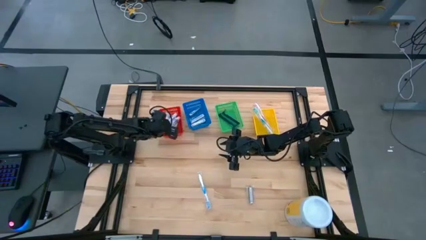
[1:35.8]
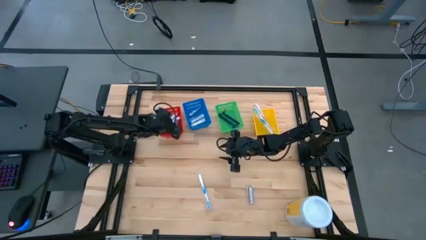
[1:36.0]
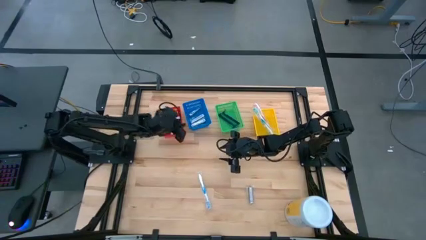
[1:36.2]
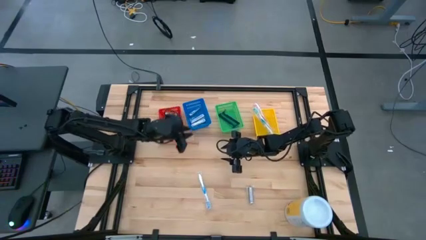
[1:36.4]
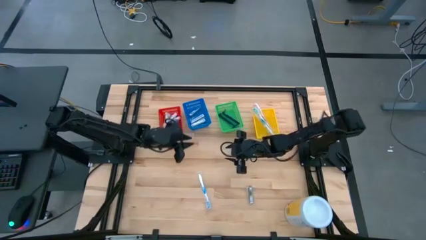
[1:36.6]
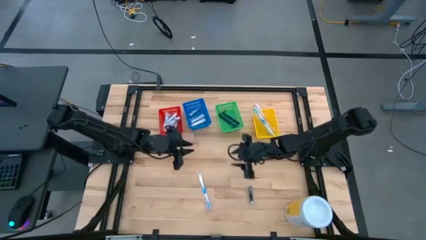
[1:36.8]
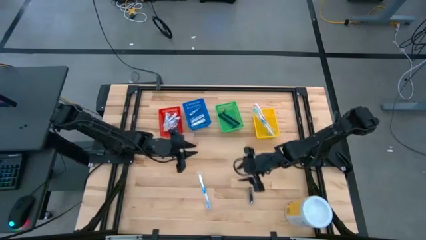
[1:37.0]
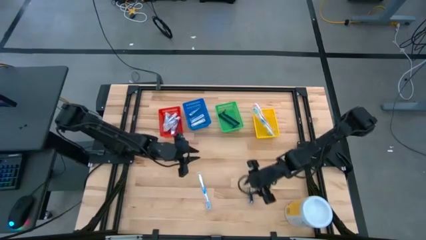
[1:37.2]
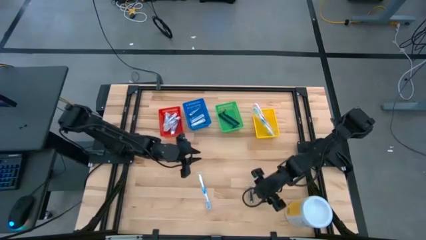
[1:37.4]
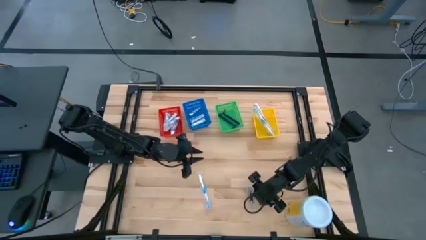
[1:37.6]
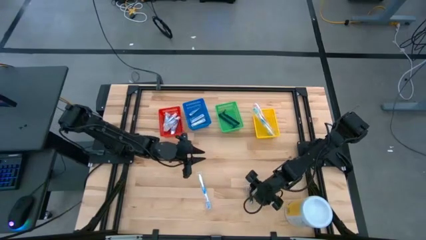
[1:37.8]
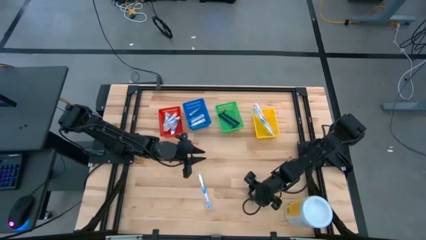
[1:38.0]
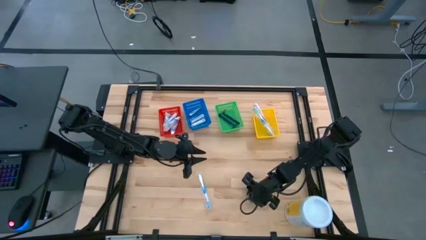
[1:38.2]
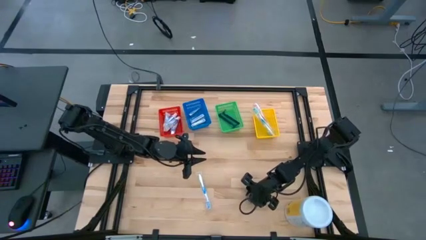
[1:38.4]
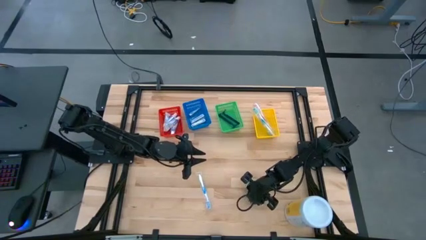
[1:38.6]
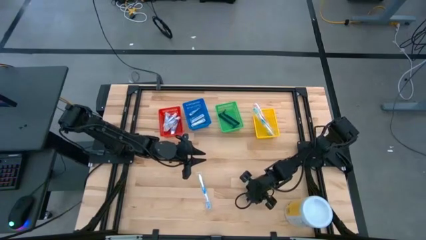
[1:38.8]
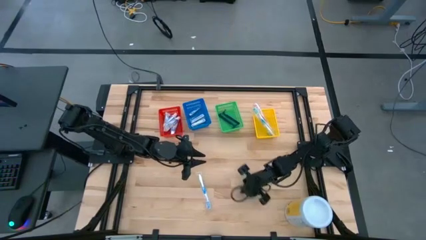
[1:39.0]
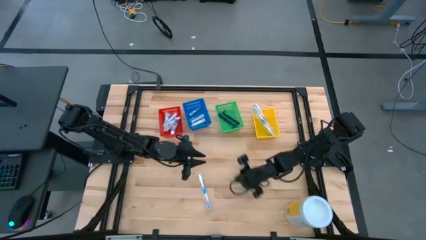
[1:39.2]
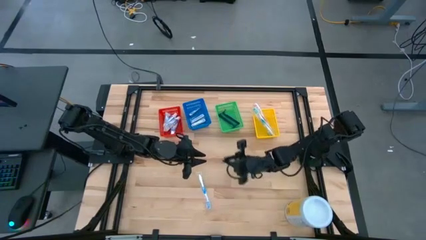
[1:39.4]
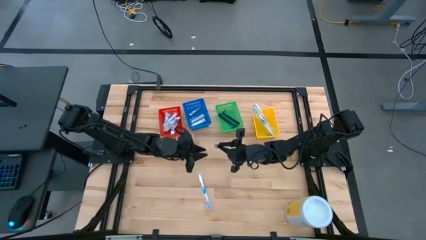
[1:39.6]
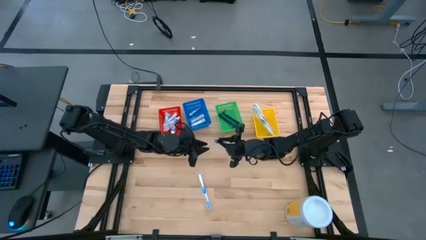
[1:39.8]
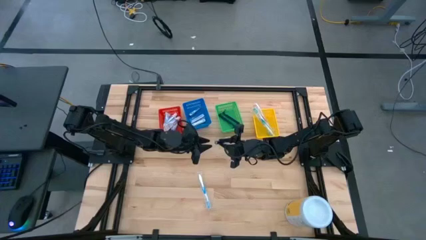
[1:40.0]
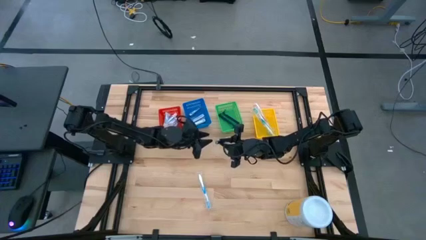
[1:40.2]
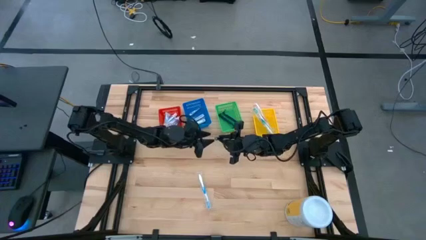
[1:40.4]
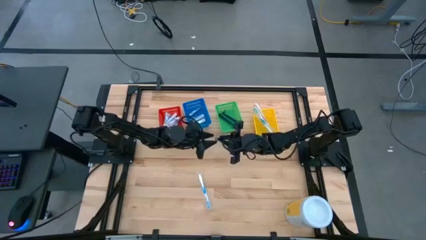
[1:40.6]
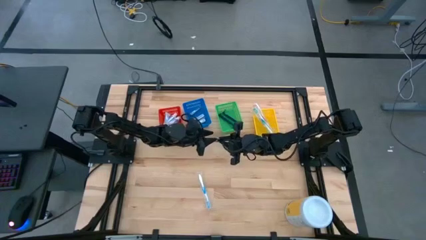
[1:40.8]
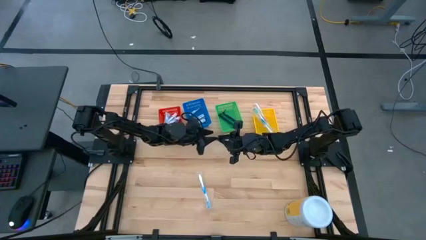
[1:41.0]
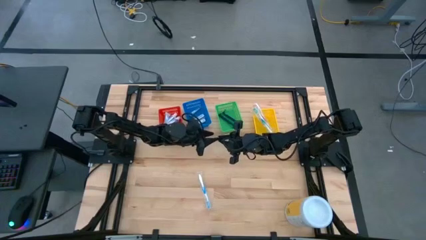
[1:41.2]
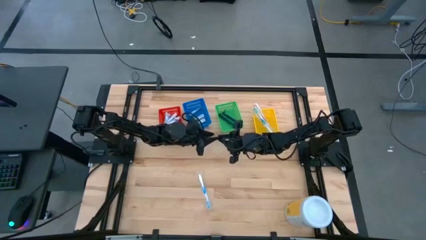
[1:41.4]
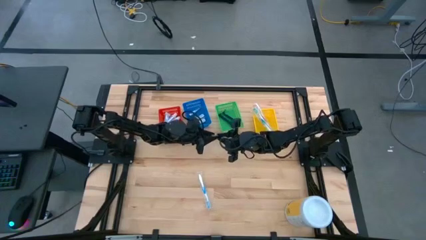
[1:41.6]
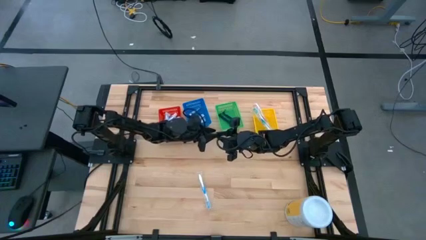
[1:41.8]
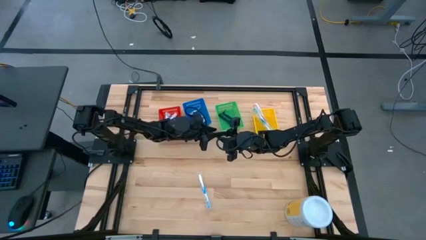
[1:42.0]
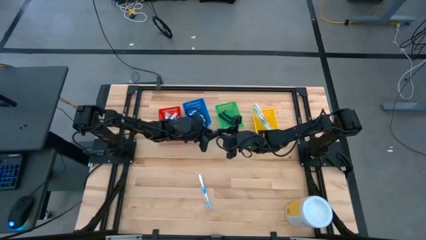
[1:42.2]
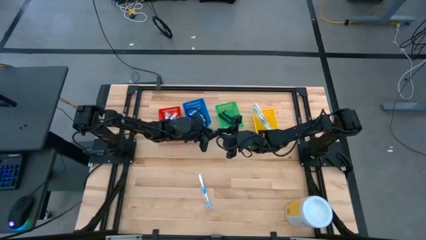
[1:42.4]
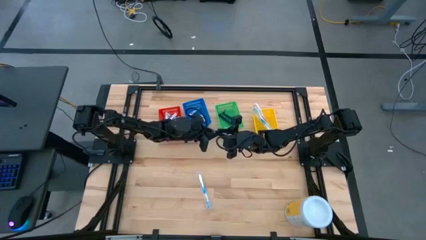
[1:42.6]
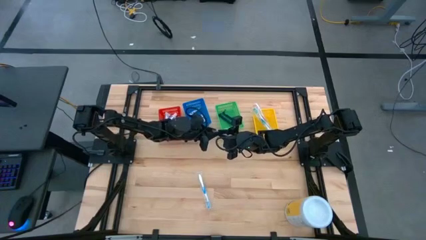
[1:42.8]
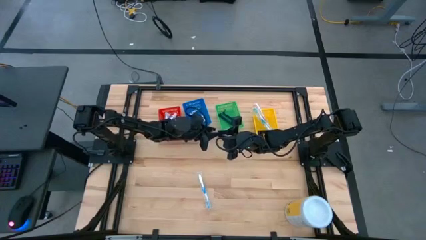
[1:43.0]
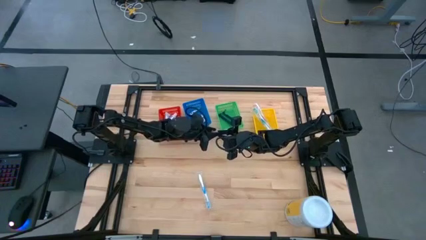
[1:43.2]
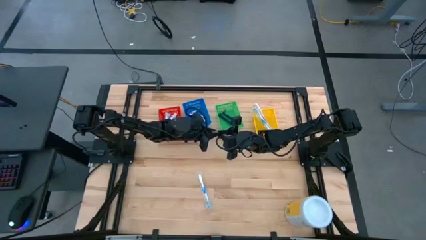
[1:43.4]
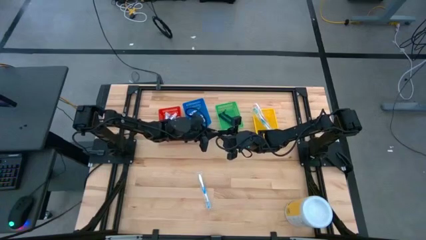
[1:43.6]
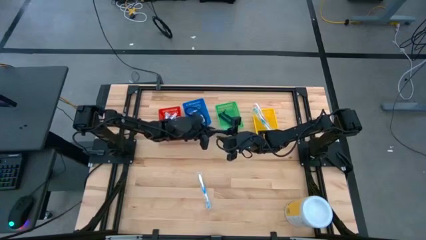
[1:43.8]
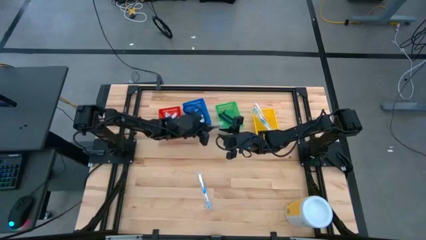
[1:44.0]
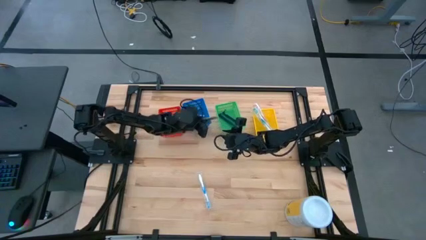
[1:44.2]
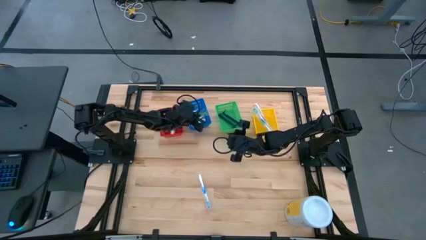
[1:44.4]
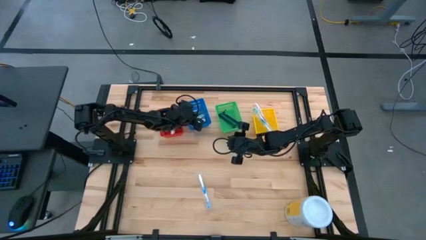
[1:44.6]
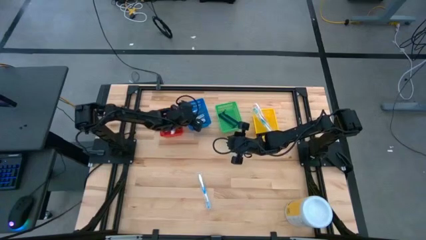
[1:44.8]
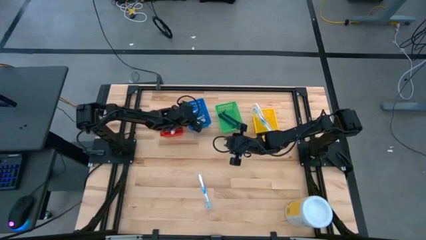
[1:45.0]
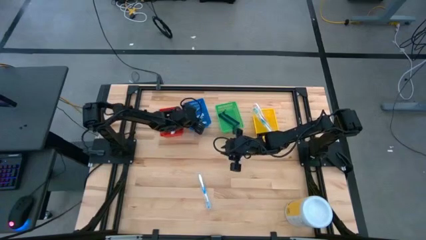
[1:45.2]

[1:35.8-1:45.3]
Task: Pick & Place Travel size toiletries
Put the nail cutter into the blue bin

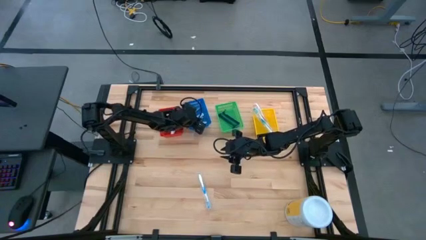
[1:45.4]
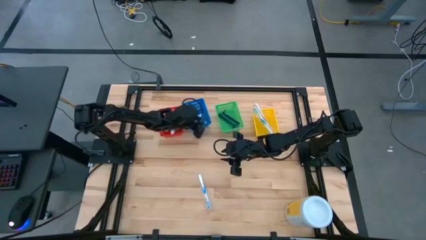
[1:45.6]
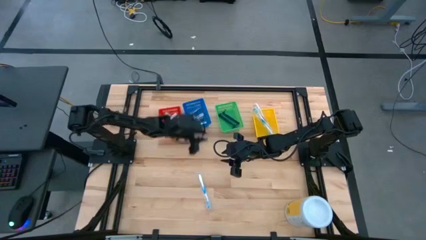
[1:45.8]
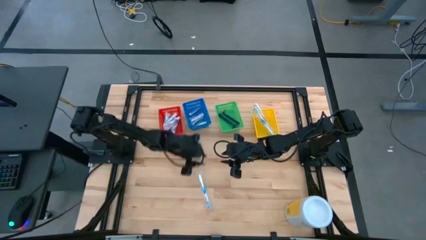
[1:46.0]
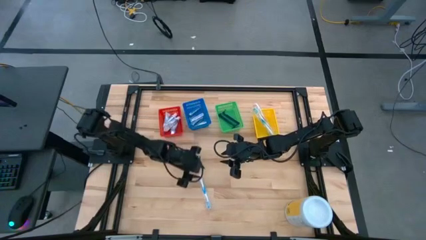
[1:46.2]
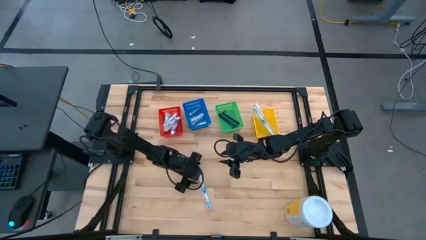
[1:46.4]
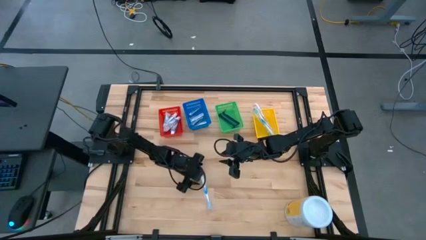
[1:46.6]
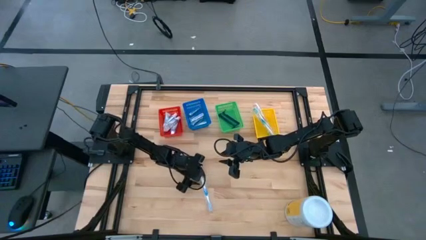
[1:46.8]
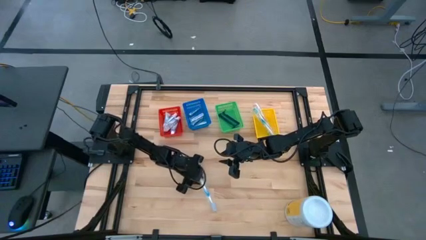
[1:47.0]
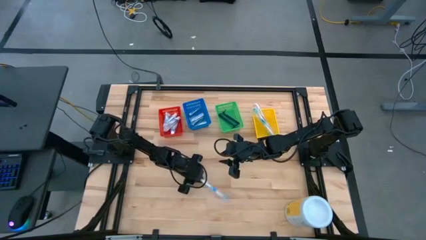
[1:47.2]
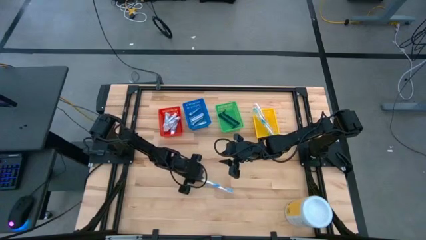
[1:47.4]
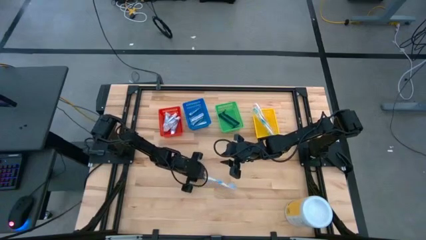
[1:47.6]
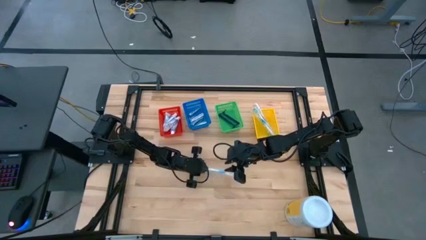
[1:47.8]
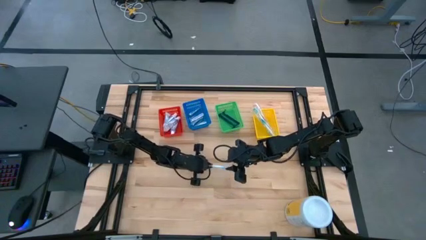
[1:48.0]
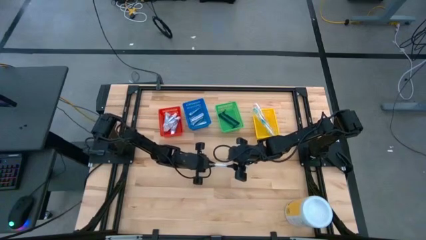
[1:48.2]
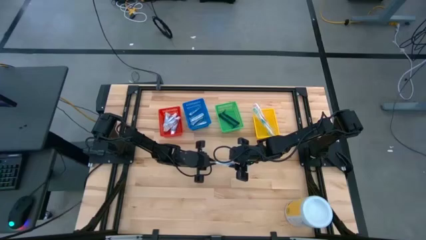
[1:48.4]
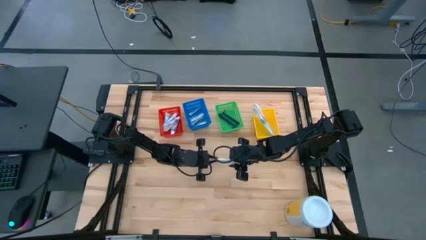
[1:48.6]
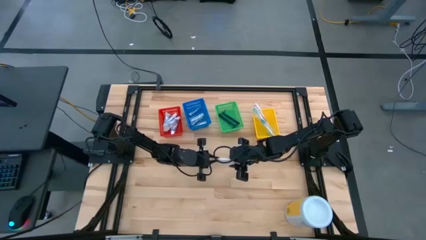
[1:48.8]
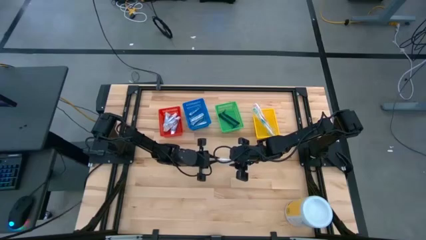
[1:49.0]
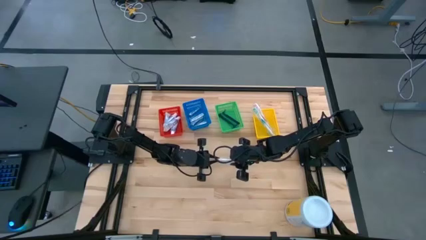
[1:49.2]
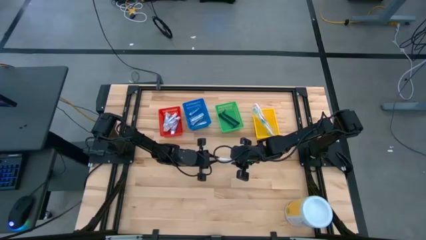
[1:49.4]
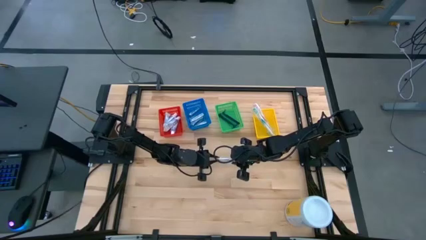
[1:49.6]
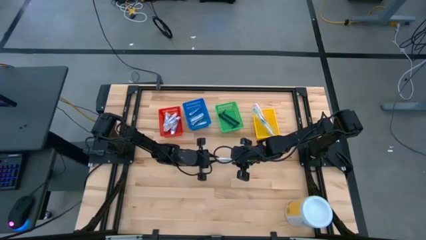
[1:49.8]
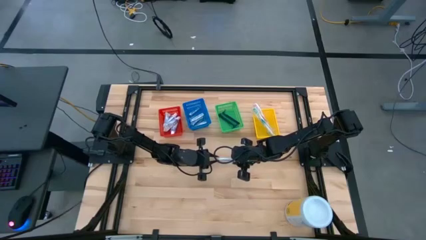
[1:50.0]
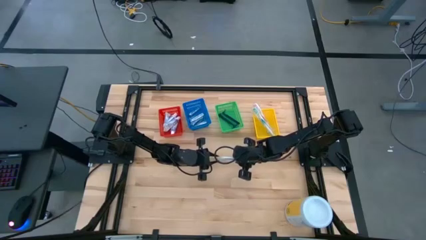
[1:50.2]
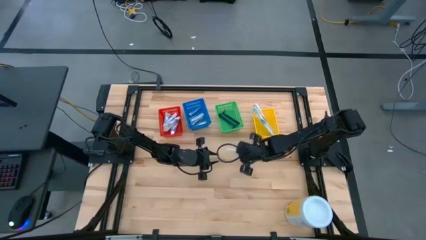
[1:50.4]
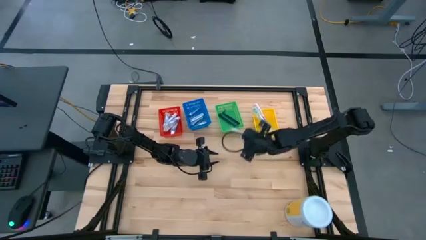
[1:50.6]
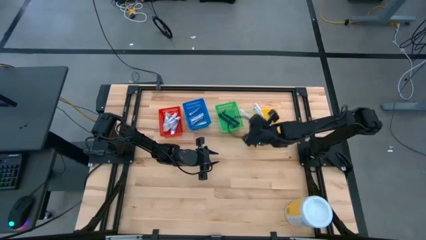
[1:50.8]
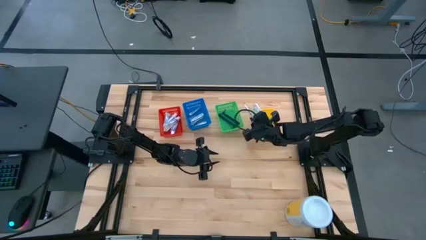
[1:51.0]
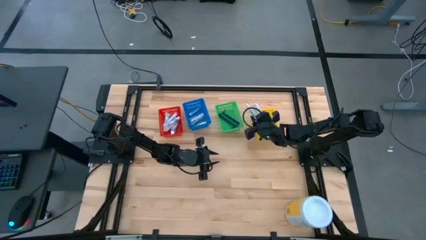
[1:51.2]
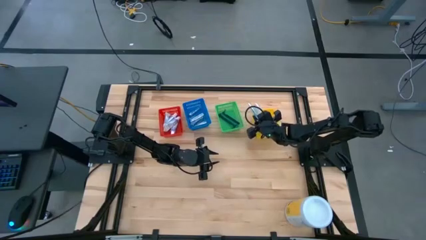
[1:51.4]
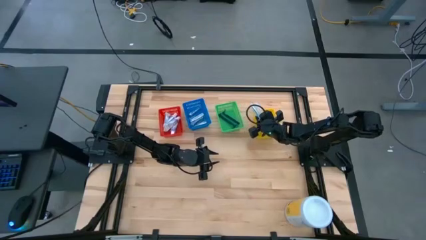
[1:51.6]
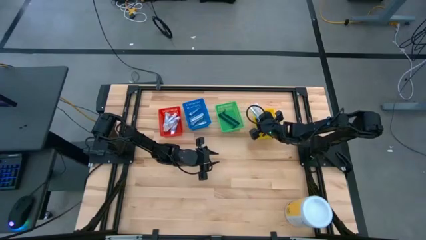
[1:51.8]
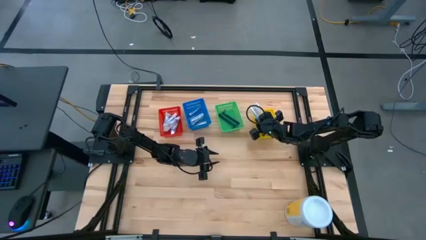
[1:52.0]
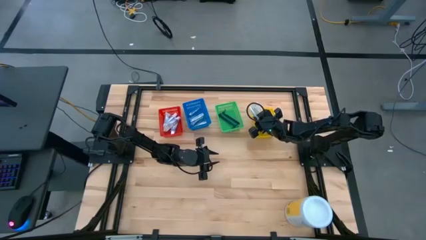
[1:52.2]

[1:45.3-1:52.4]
Put the toothbrush into the yellow bin

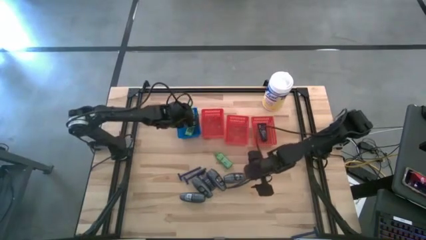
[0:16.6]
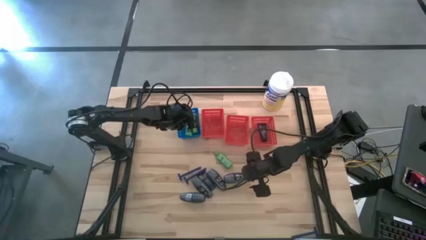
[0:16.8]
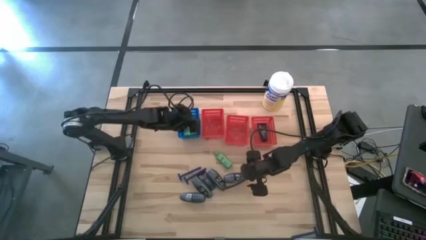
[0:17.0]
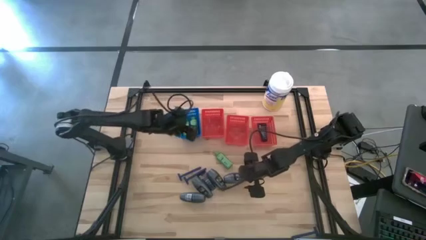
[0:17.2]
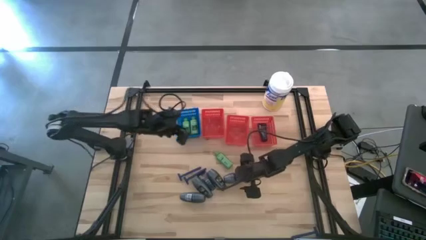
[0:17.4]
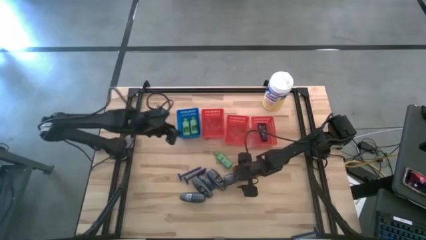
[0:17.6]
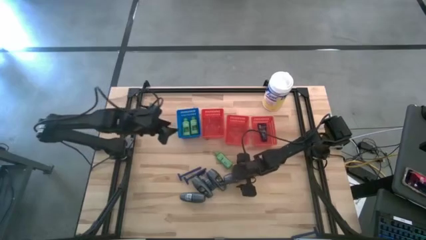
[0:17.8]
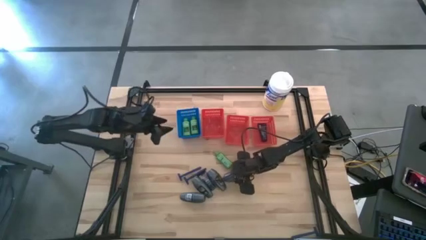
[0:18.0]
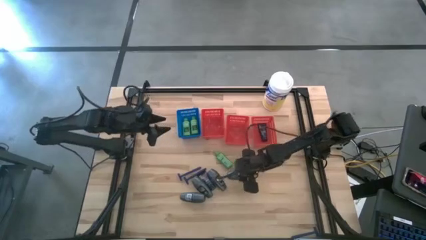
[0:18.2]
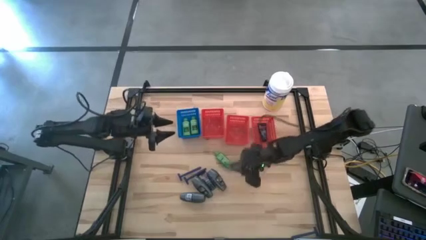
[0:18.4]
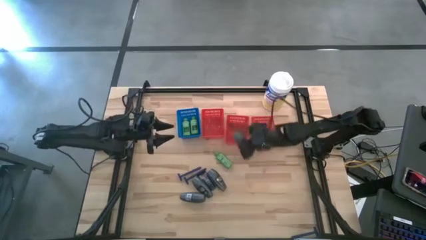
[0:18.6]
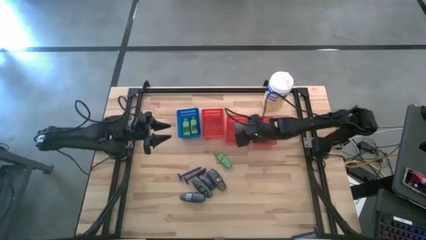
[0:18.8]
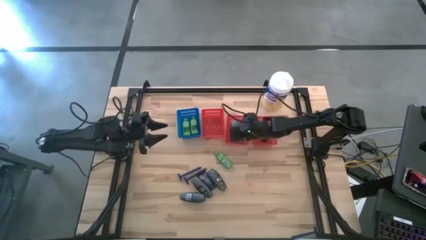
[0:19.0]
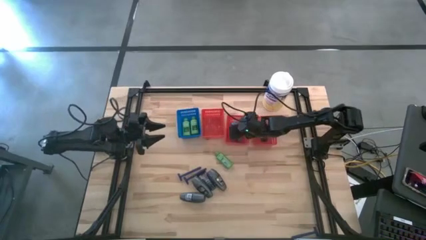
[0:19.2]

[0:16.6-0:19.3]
Task: Pick & Place Travel size toiletries
Put the black deodorant into the middle red bin
